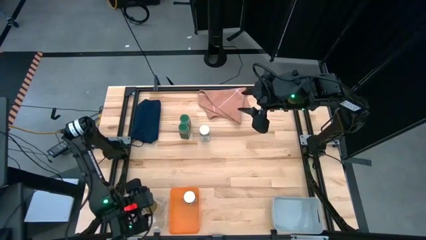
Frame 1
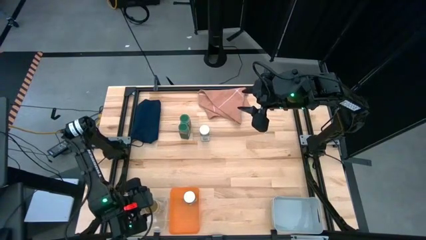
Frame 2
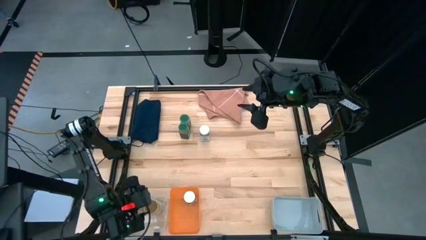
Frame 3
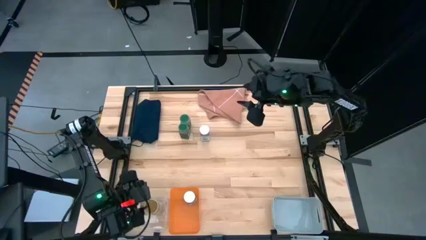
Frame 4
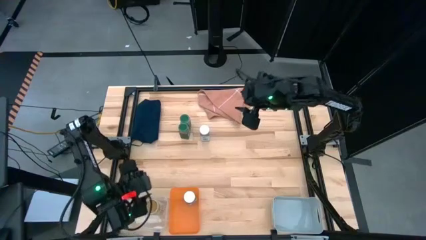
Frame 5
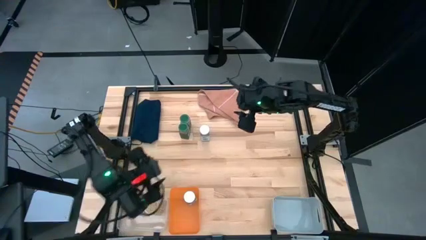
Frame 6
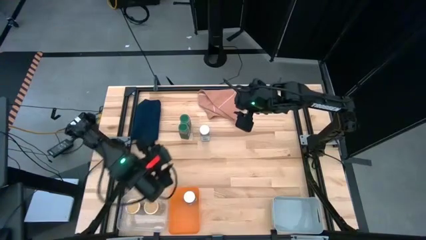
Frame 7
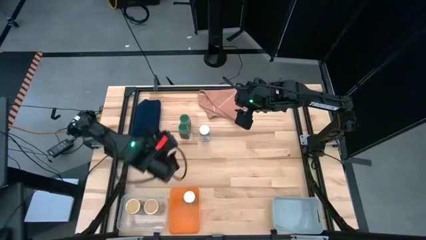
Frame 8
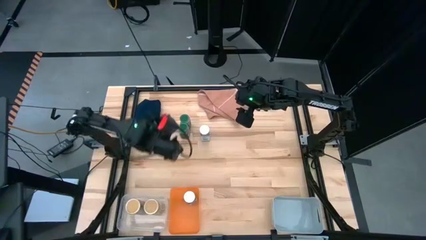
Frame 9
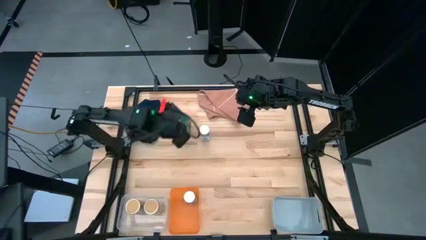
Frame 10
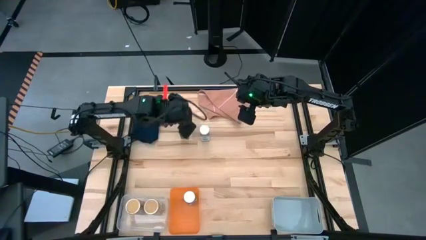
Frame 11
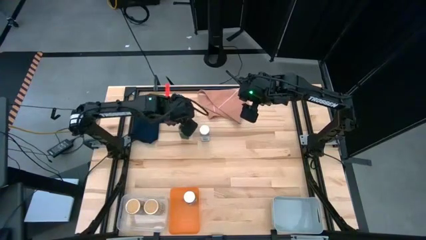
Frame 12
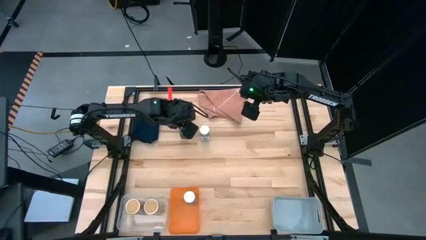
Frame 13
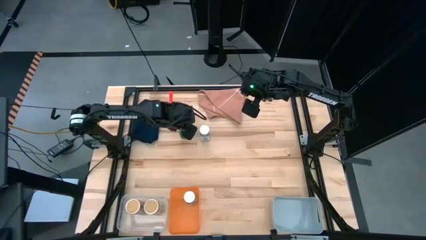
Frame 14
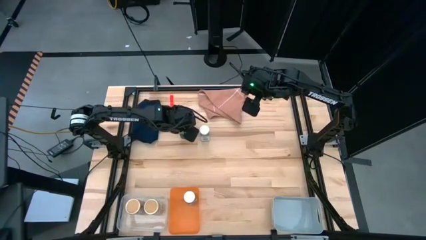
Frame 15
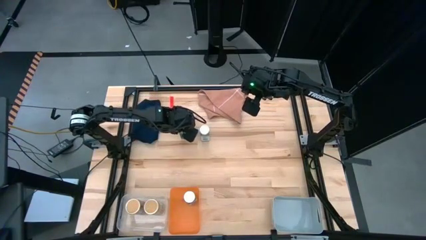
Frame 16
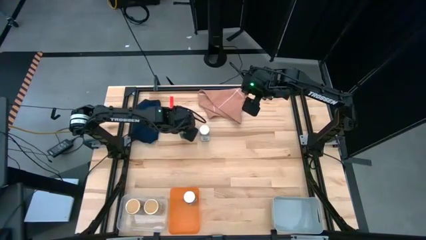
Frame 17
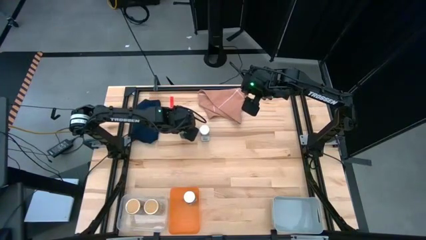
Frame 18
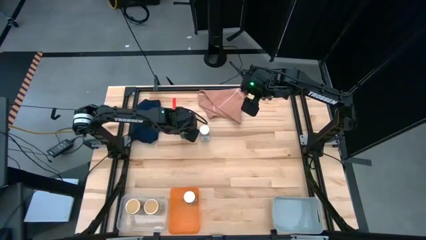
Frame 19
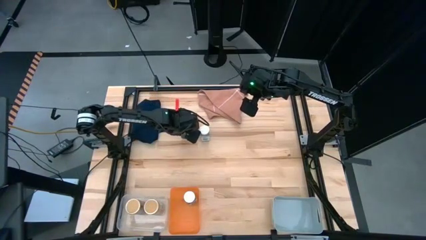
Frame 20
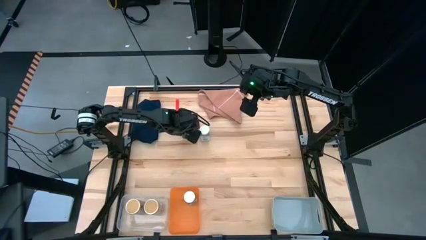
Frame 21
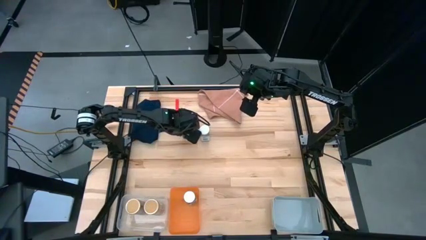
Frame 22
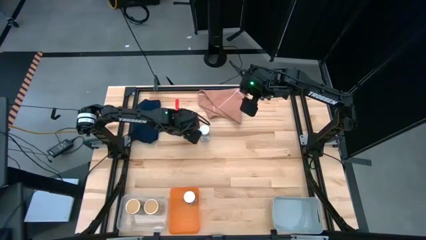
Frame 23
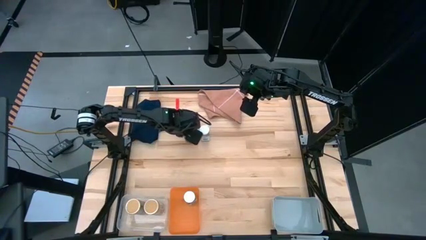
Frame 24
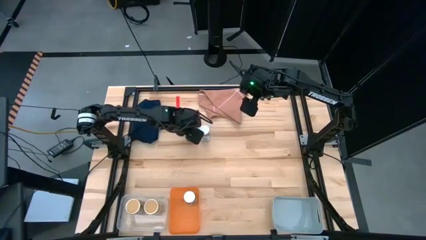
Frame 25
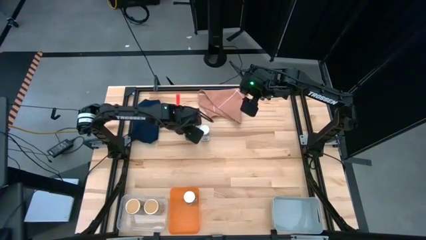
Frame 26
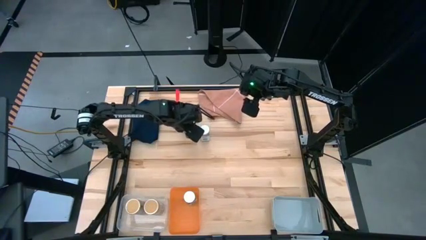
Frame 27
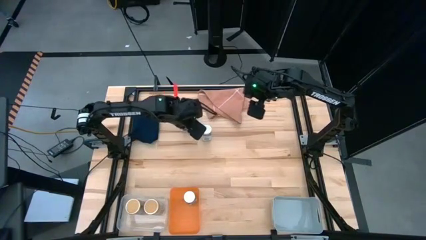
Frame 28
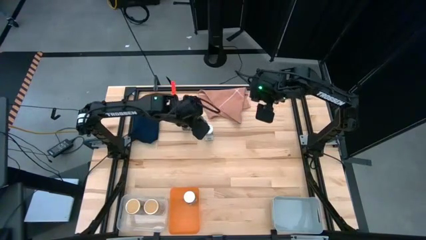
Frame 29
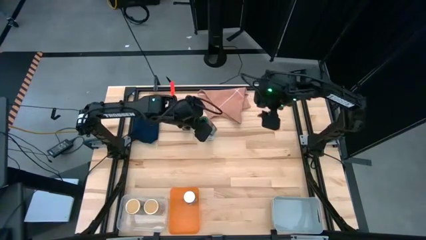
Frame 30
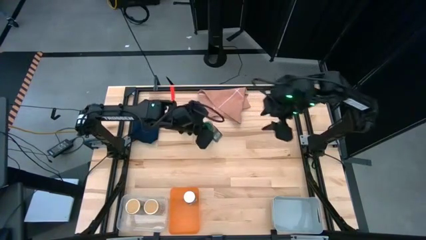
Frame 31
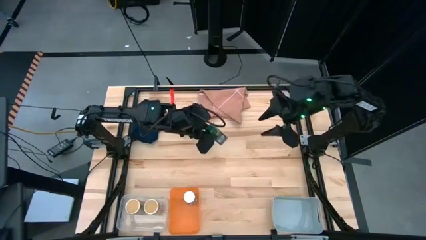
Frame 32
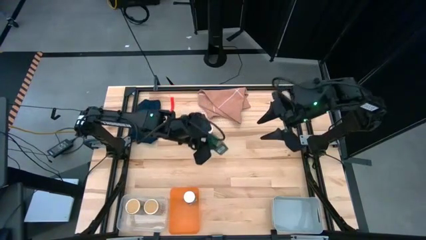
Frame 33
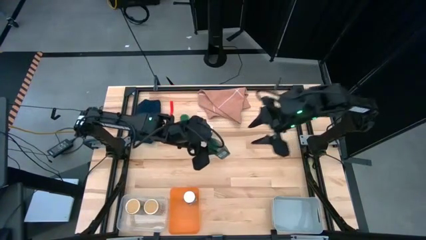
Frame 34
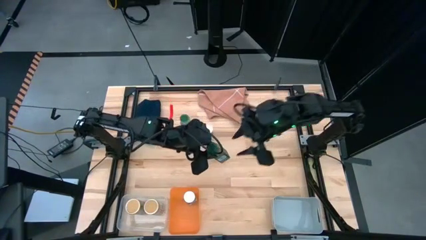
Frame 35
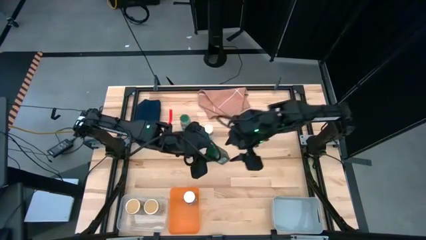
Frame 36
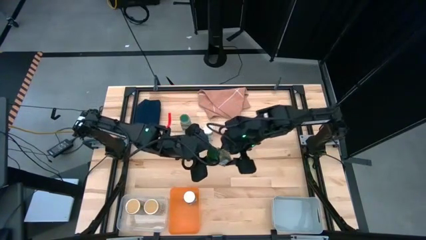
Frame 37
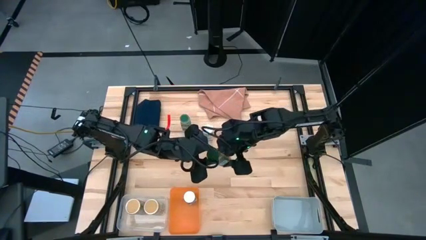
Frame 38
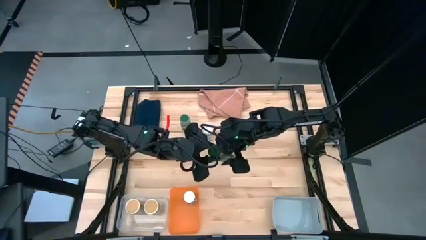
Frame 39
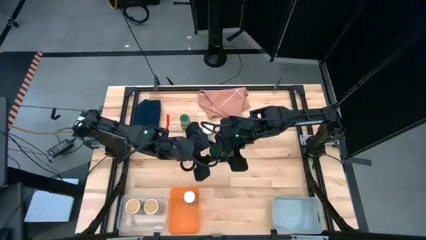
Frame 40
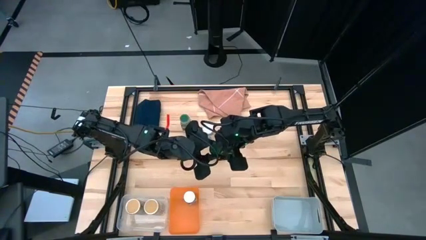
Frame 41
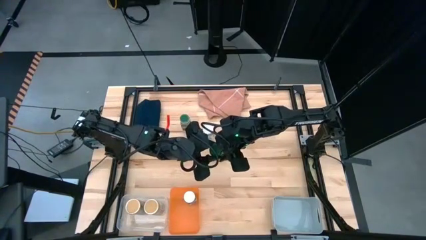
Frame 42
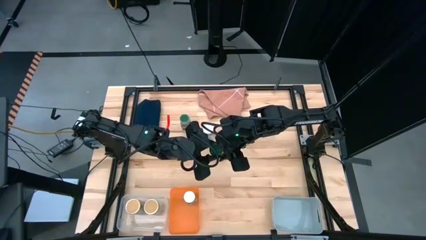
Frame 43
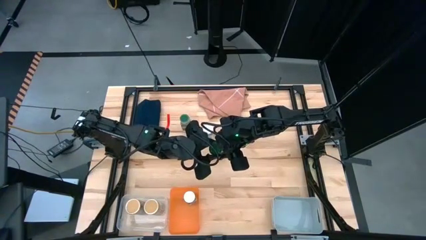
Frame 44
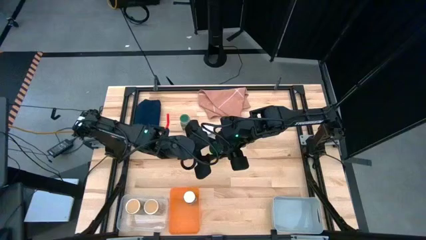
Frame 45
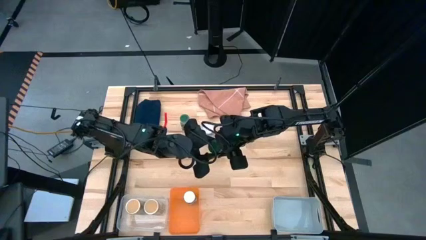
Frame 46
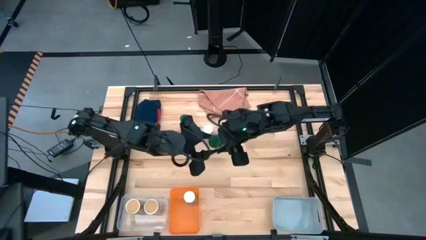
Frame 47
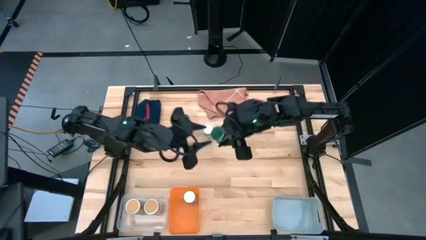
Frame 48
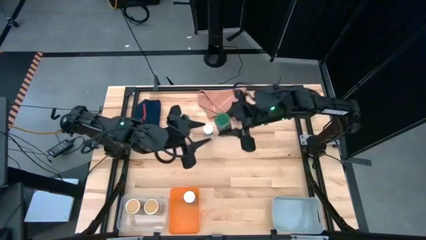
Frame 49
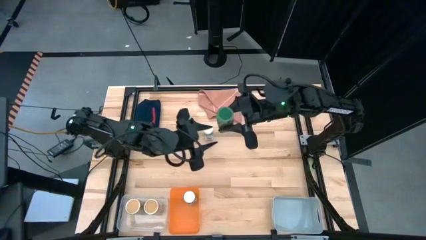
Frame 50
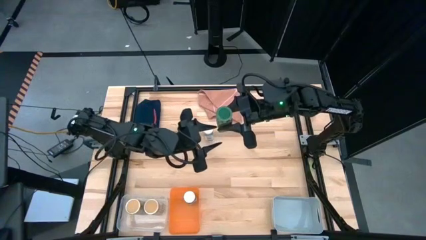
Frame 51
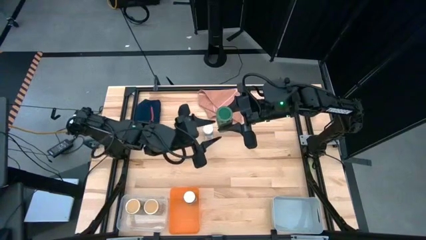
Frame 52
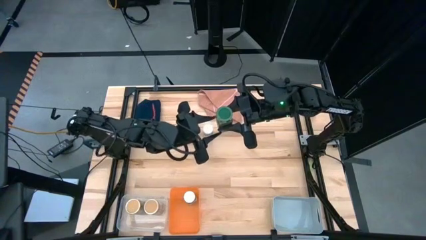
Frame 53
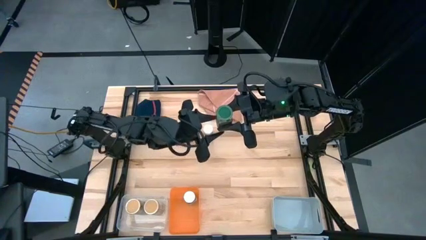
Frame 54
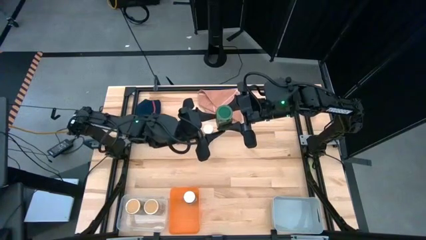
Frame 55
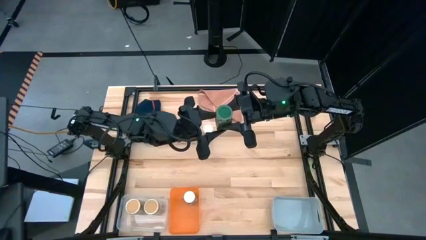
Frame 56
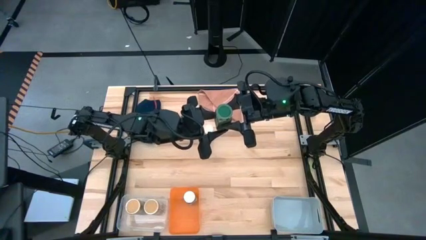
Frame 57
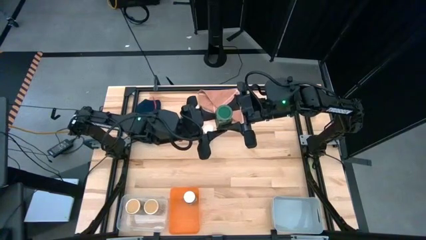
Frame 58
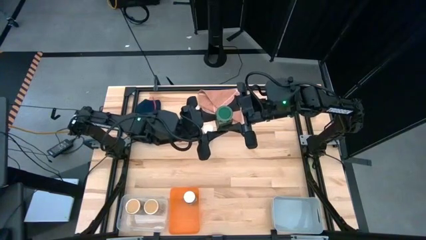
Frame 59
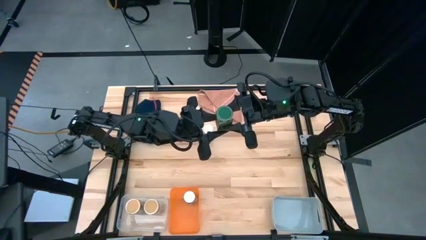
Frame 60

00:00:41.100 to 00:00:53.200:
Task: Sort spices by type
Put the bottom green seasoning bottle into the gray bin
